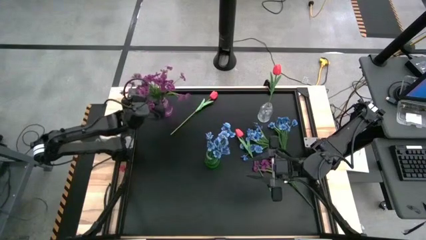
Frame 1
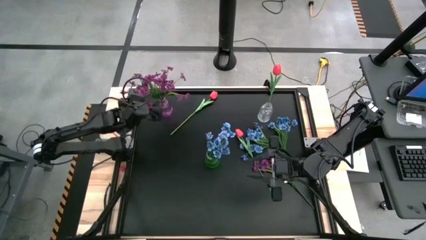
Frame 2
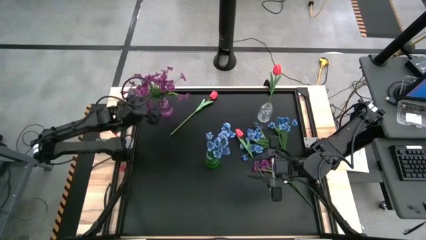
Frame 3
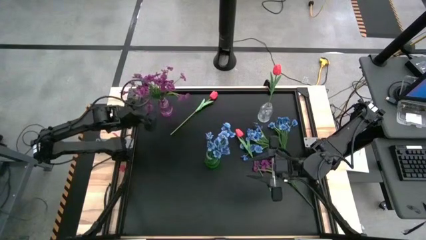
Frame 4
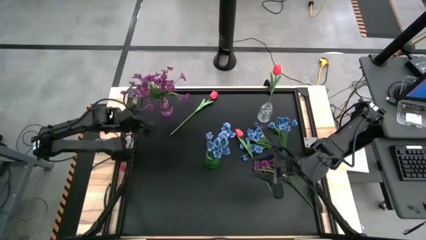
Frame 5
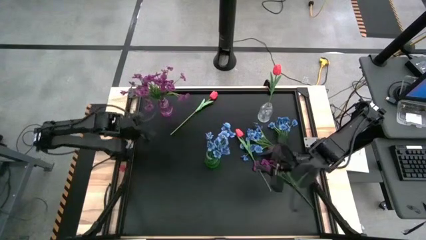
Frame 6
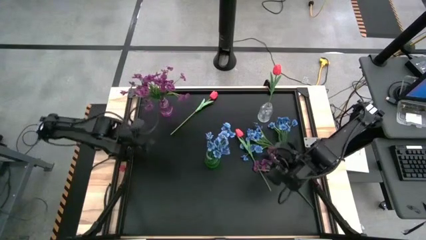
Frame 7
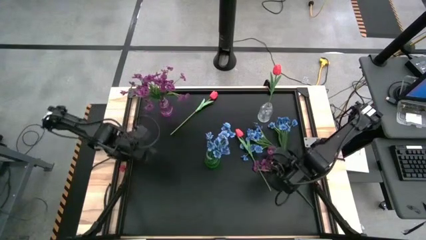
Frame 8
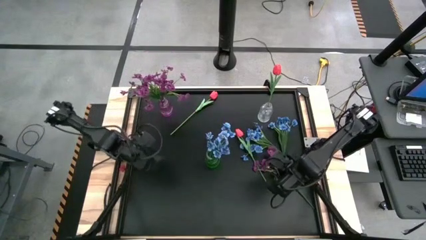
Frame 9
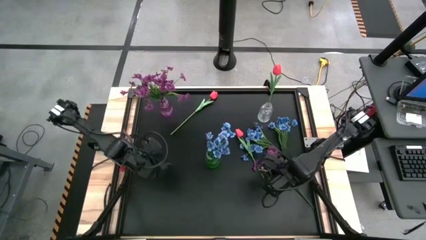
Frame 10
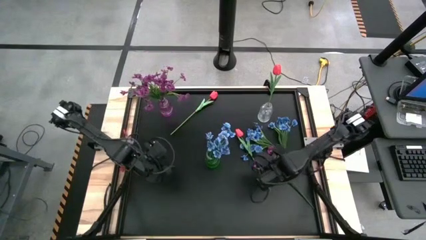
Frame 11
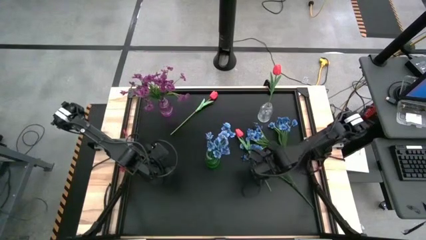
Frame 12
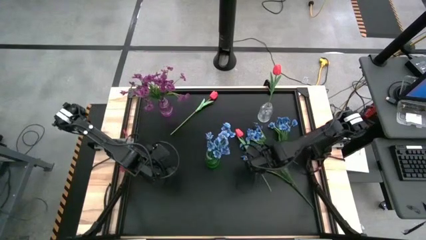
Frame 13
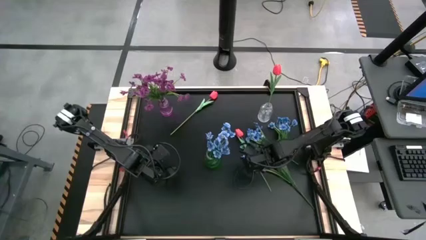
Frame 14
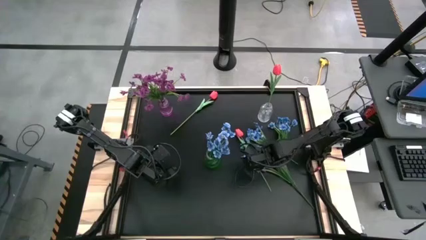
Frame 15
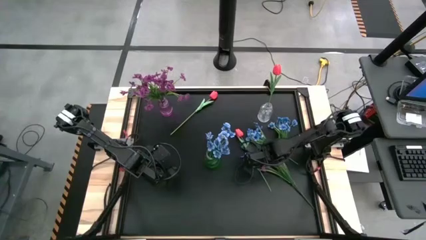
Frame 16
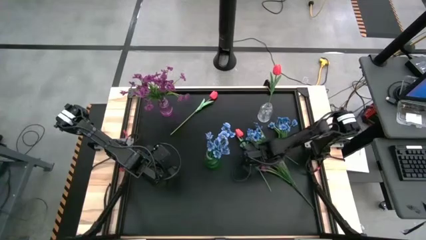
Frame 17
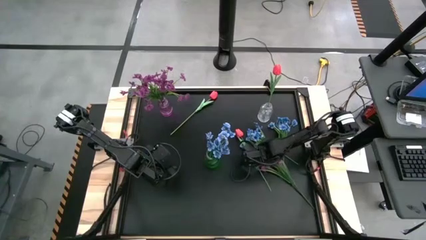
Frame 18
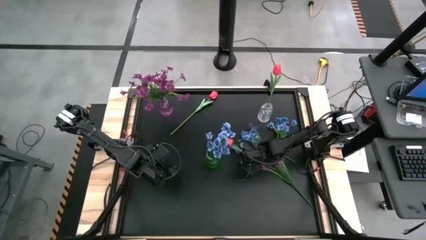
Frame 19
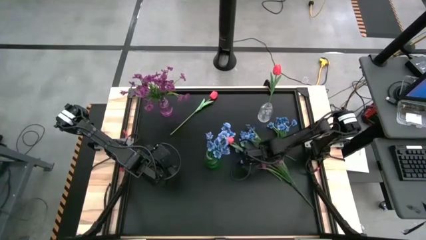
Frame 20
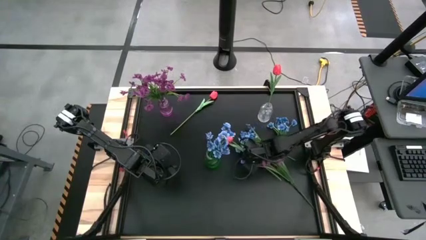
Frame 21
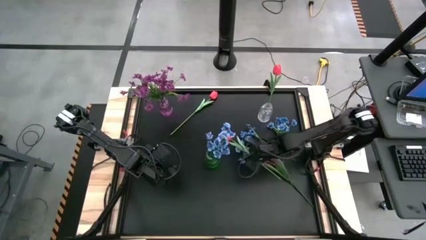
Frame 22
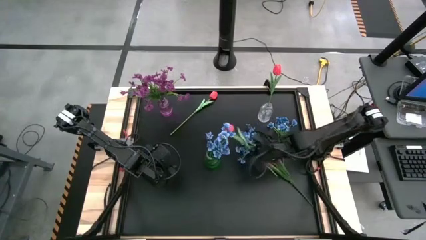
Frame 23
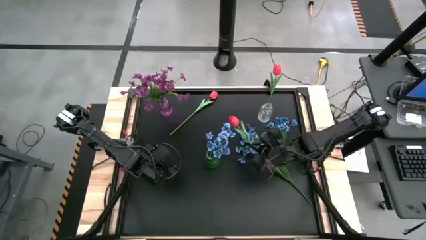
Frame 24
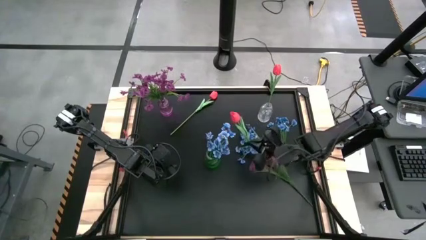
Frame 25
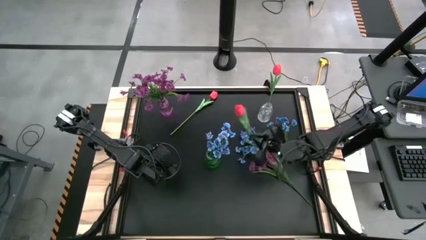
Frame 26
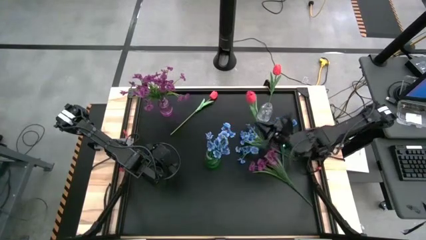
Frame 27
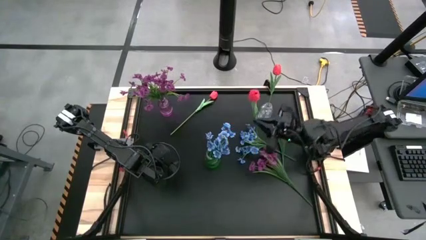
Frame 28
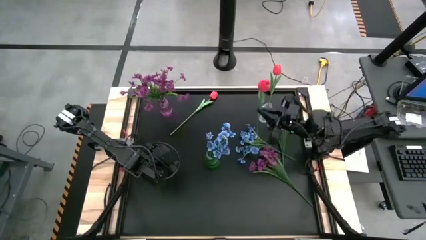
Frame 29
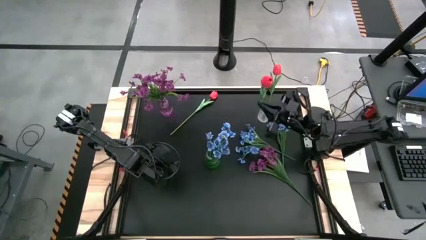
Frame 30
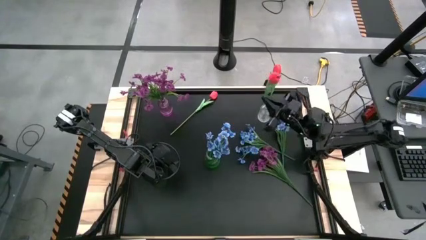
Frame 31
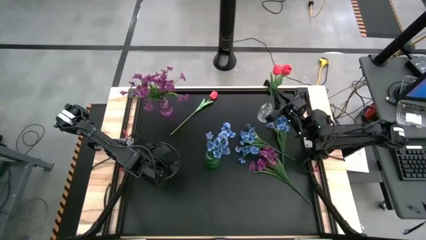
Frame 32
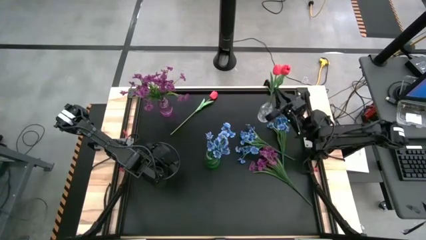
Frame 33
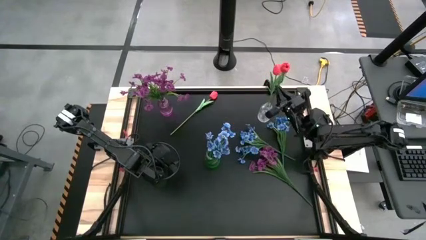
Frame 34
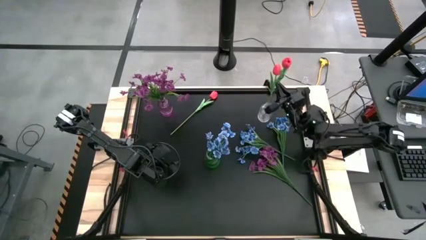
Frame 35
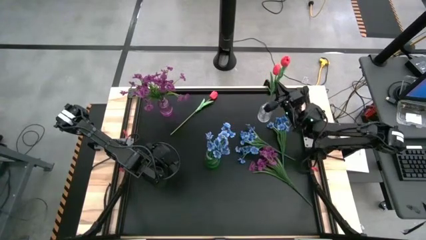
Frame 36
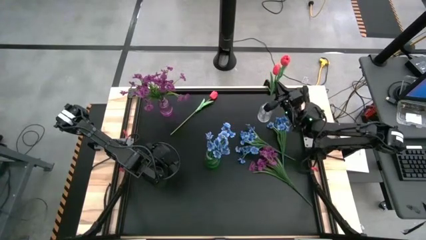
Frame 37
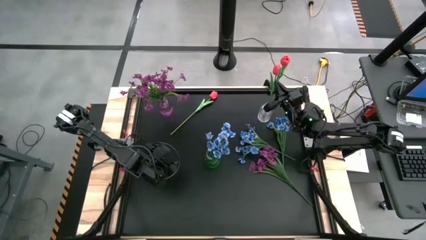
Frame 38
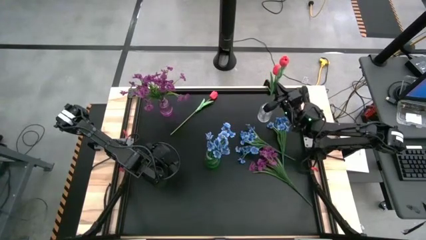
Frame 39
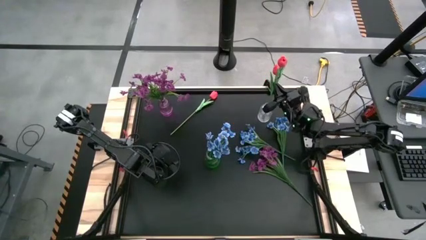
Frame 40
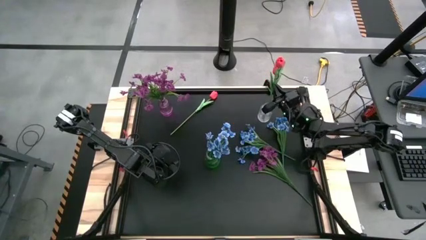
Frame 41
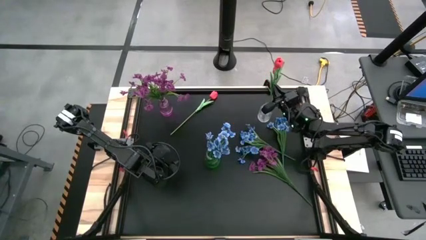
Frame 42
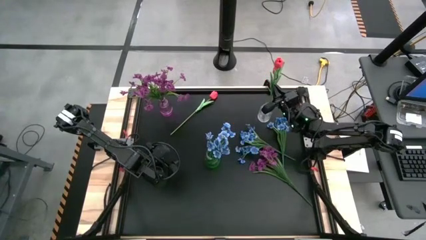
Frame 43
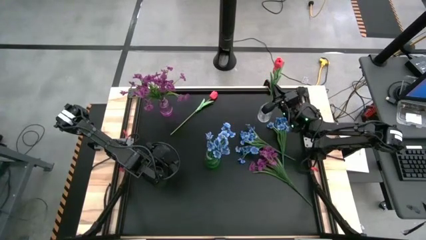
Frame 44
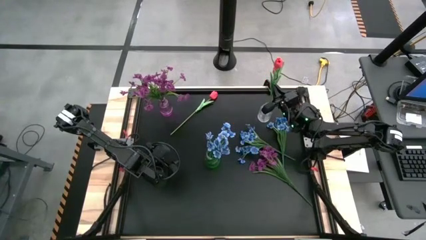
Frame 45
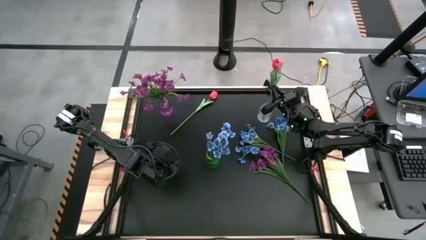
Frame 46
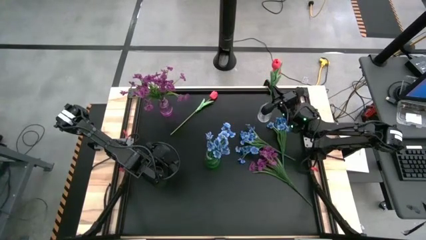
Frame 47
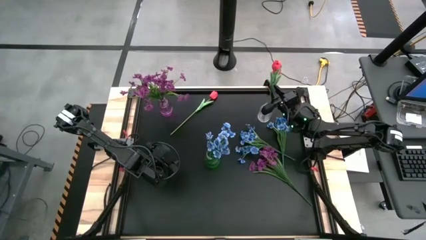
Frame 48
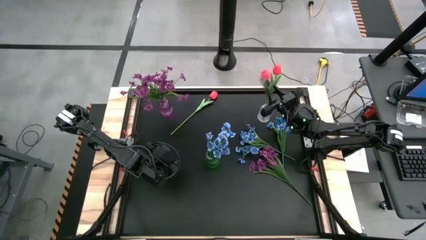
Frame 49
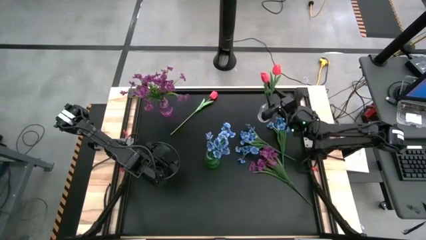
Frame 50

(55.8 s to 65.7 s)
Task: Sort flowers into vase by color
Put the bottom red flower into the transparent crystal vase

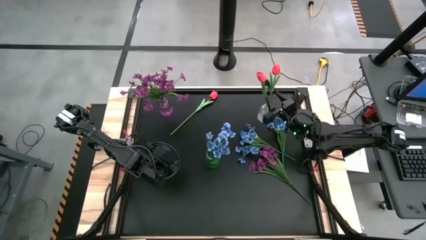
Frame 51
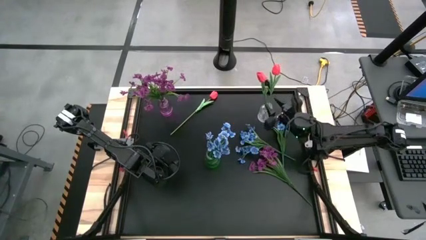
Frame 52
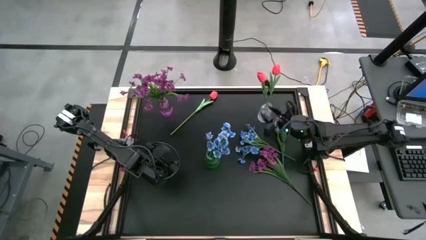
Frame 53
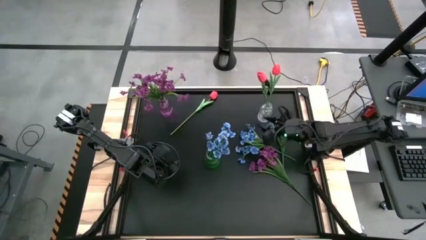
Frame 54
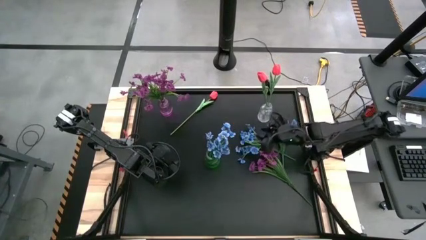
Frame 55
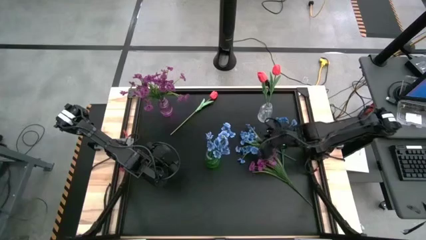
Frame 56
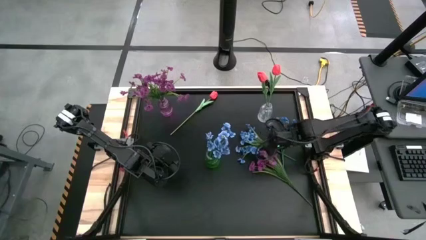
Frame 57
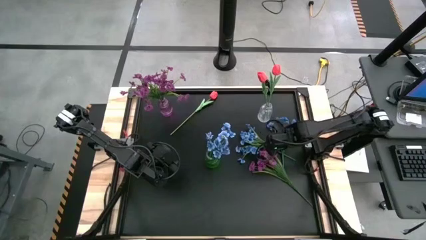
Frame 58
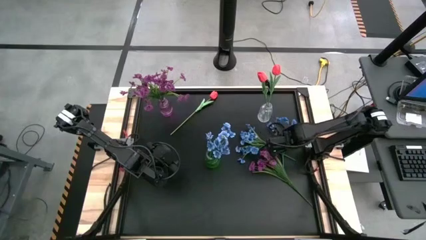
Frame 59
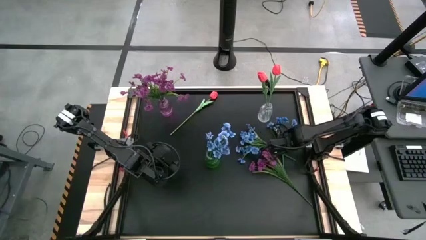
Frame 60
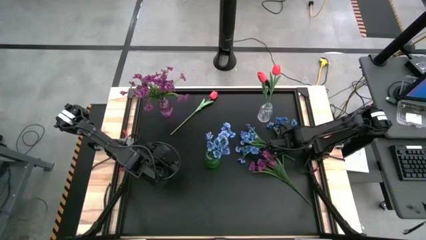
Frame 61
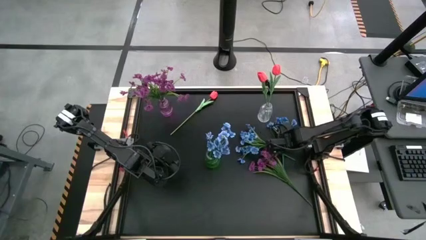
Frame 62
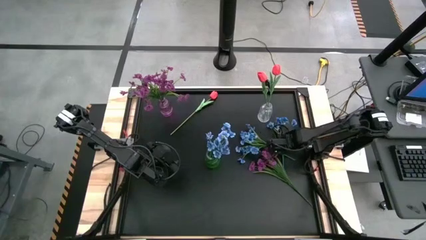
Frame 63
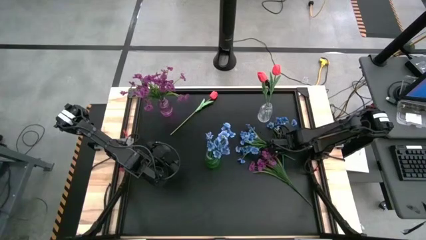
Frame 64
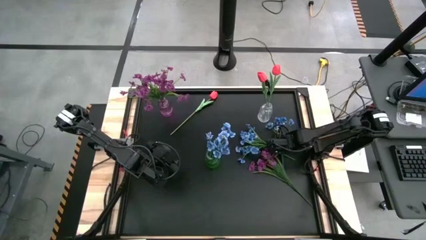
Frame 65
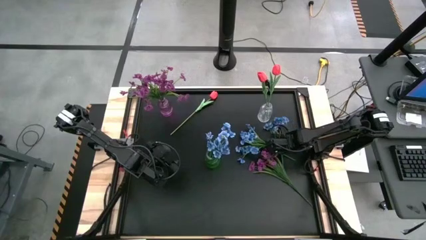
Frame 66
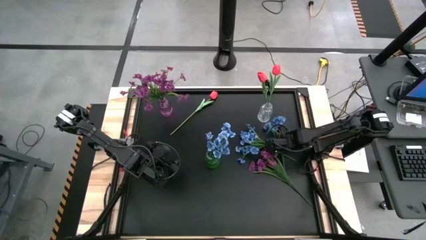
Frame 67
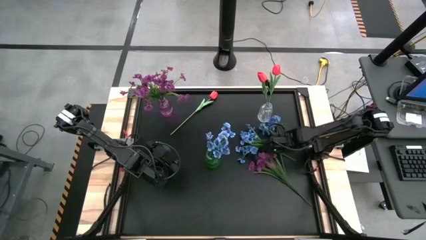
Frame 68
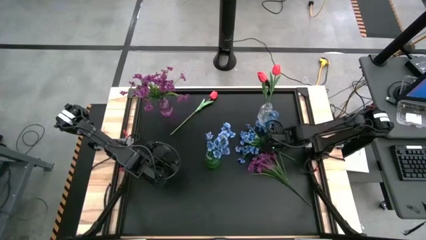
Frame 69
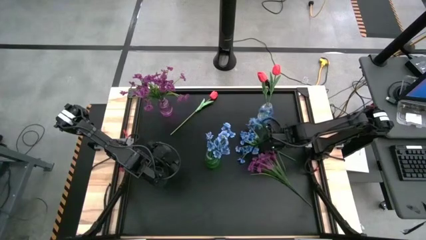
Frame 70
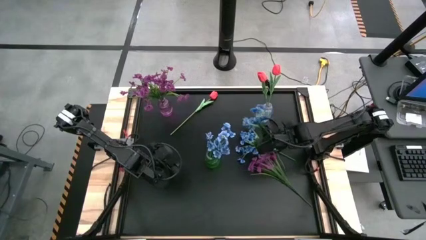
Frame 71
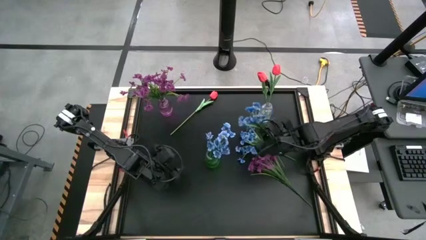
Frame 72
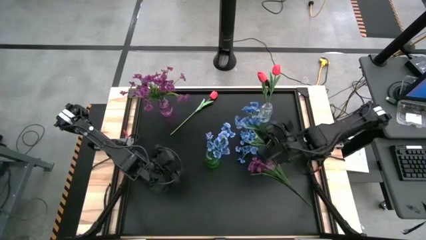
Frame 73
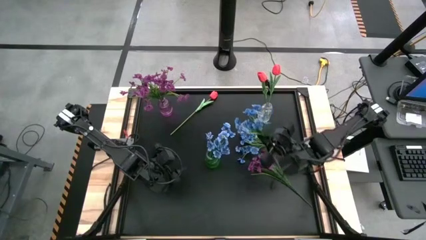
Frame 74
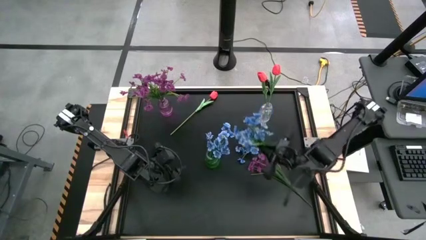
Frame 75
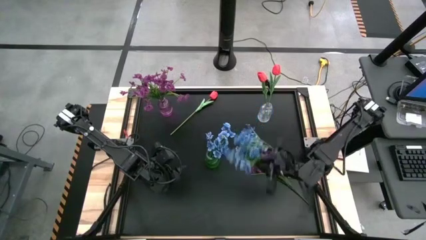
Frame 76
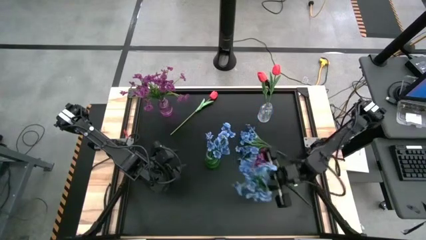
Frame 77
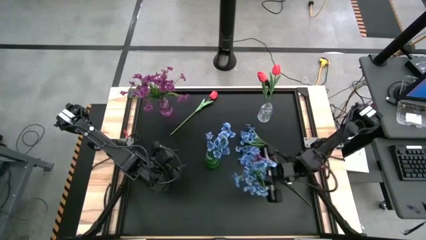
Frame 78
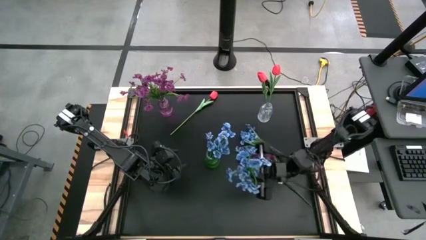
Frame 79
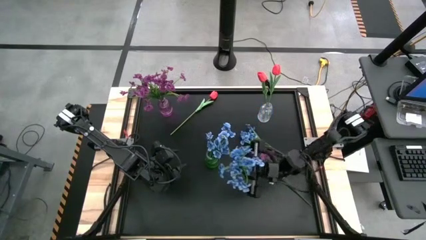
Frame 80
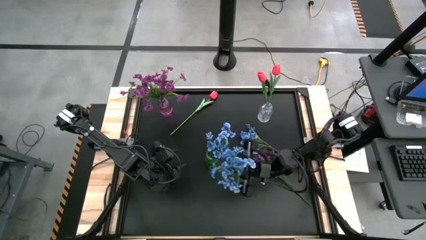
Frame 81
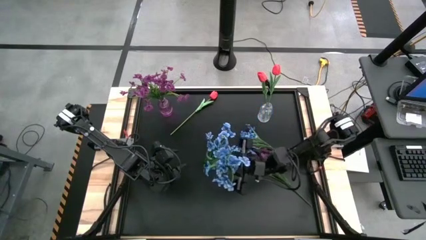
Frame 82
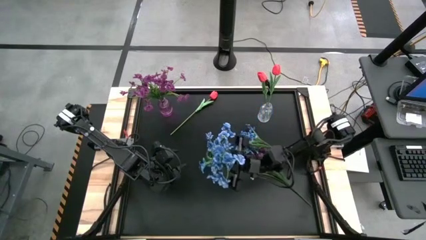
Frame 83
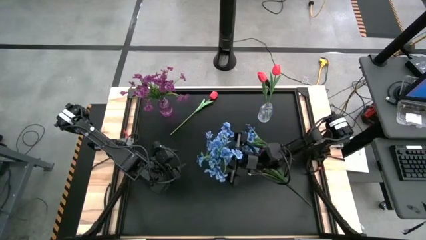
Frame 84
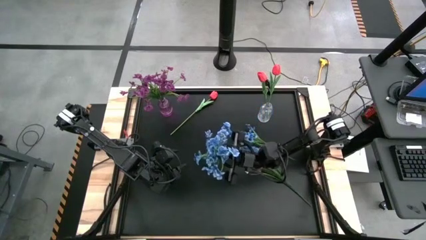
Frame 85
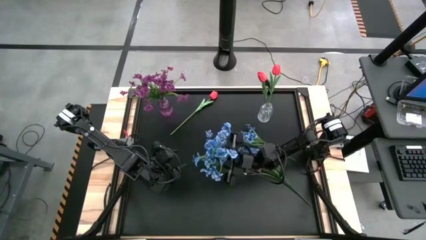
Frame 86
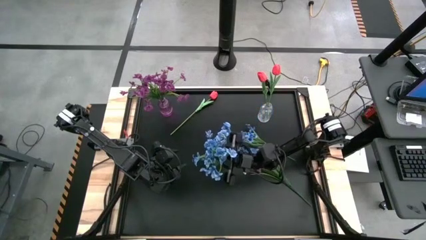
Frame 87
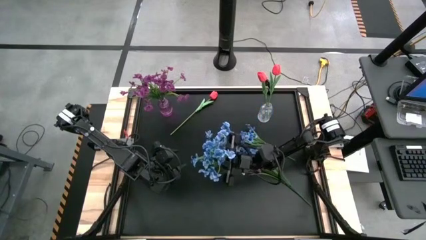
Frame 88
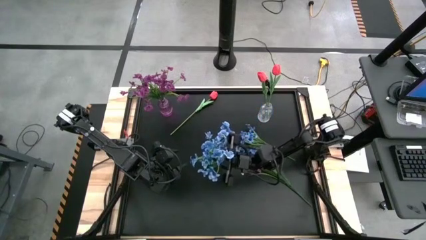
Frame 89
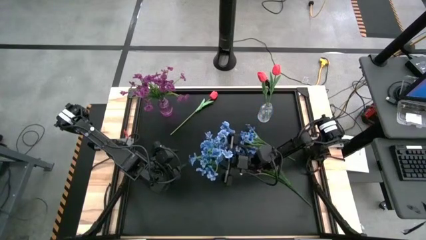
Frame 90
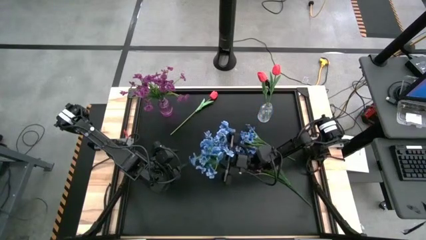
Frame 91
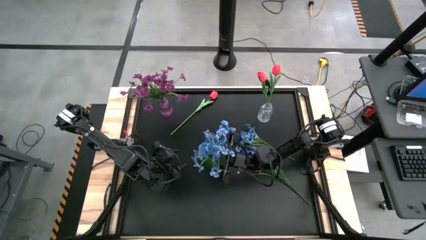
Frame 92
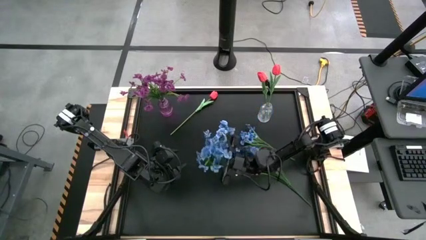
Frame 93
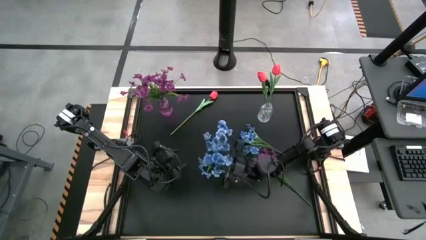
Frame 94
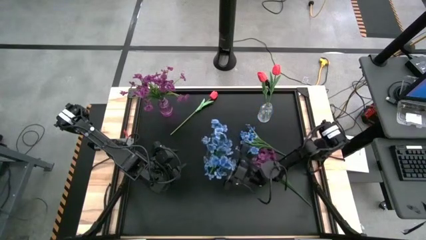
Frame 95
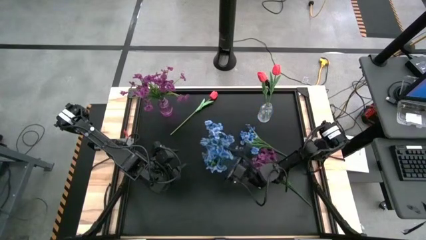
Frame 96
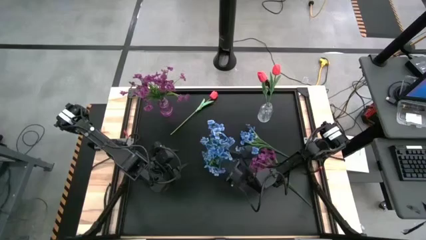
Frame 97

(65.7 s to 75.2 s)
Put the right blue flower into the green crystal vase
